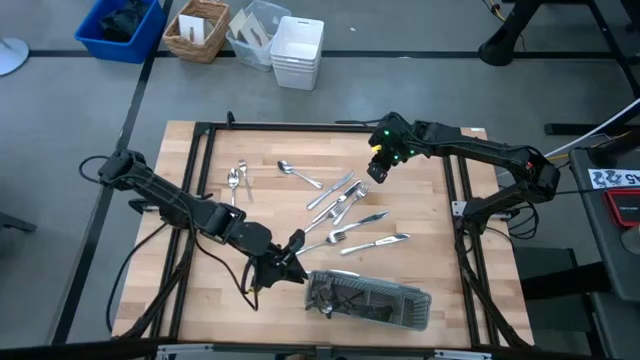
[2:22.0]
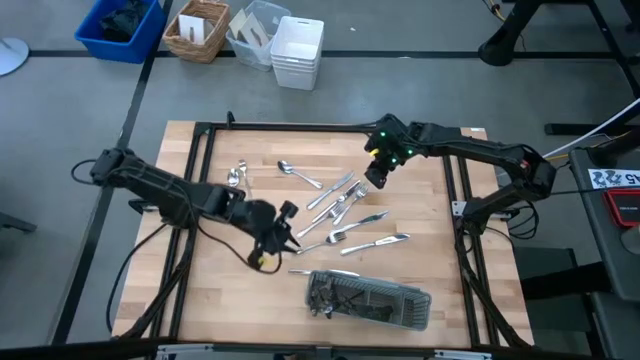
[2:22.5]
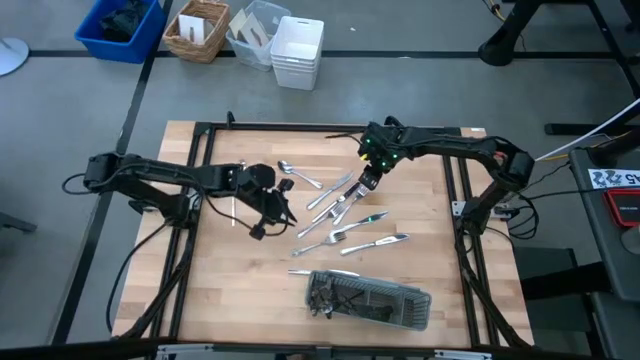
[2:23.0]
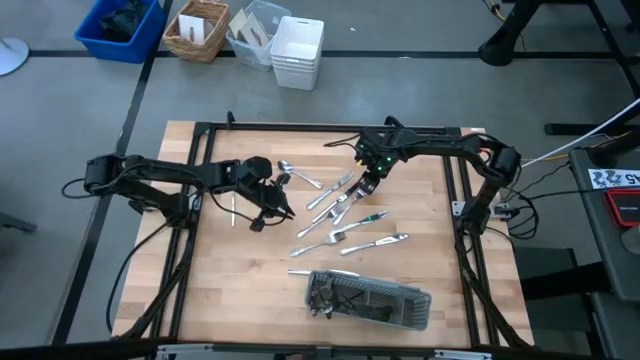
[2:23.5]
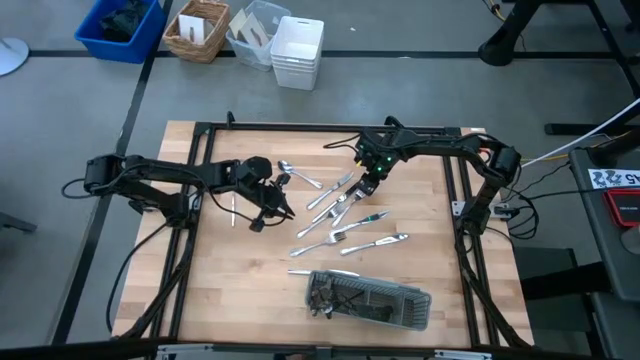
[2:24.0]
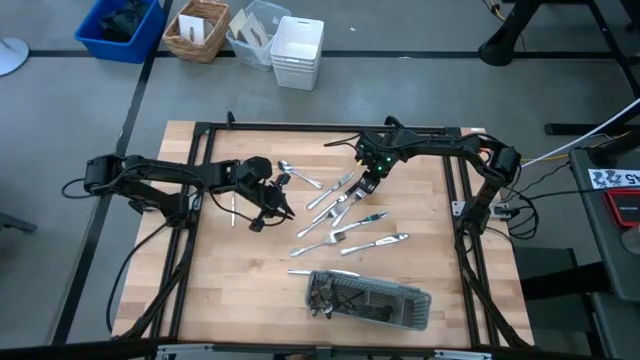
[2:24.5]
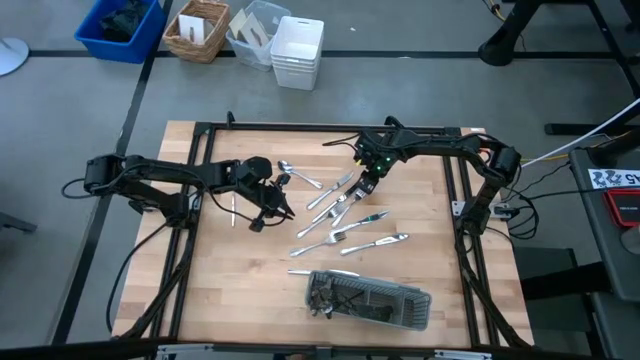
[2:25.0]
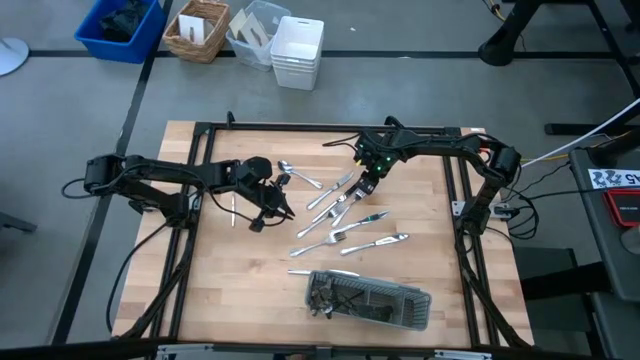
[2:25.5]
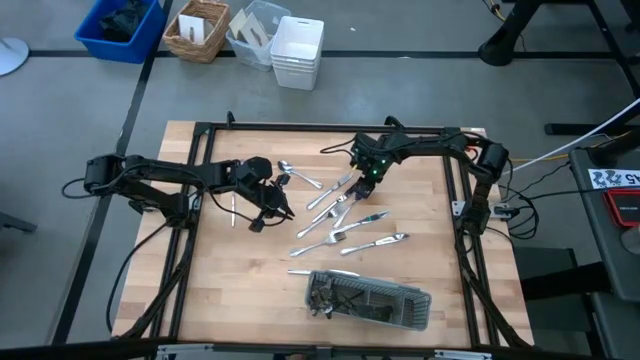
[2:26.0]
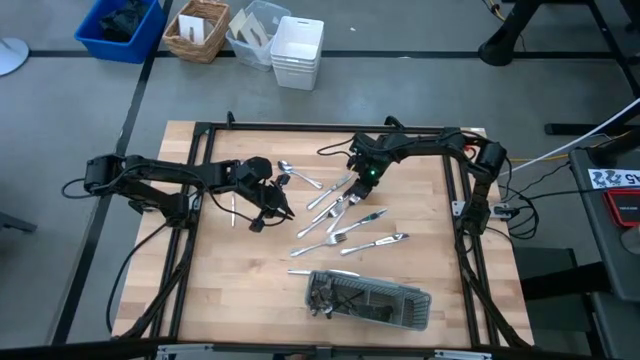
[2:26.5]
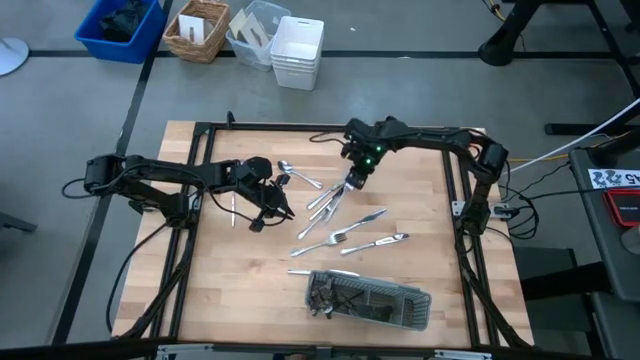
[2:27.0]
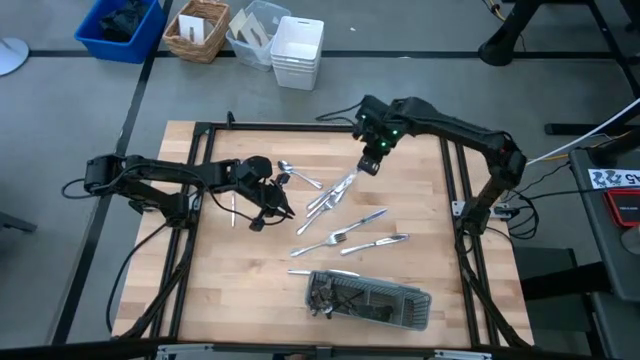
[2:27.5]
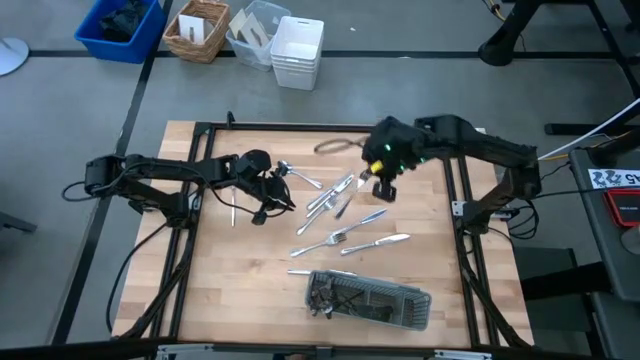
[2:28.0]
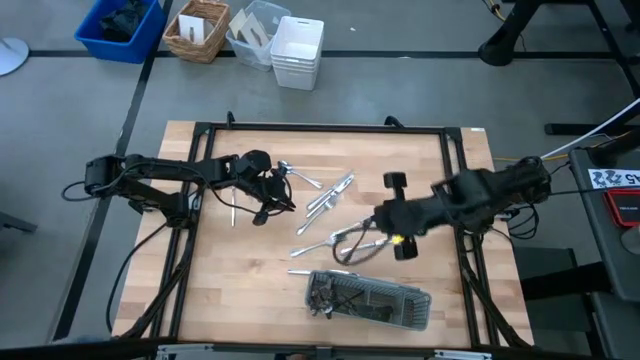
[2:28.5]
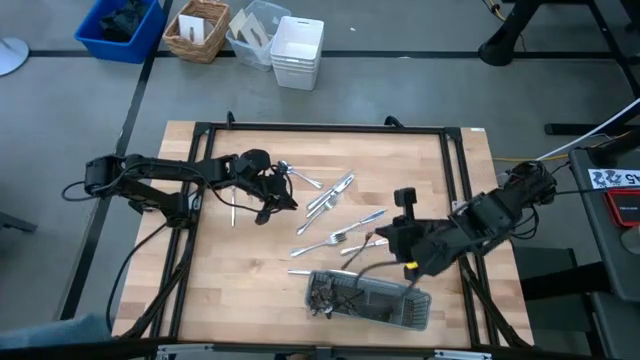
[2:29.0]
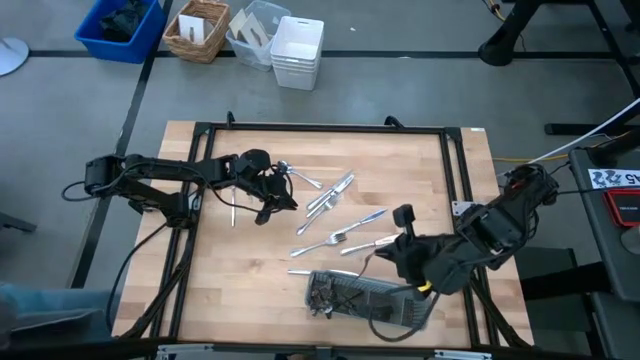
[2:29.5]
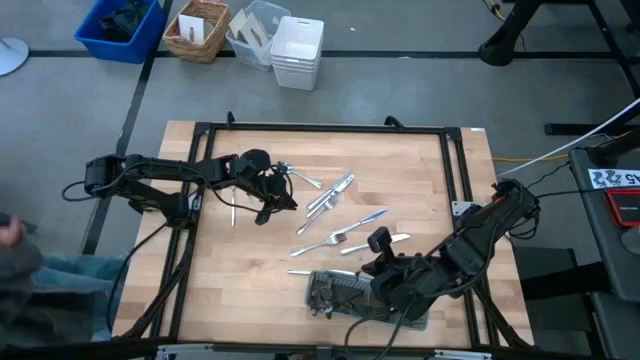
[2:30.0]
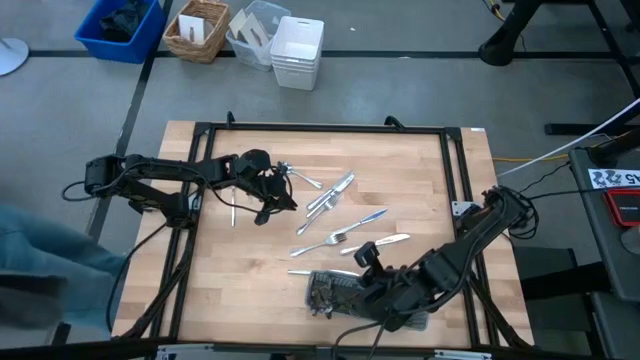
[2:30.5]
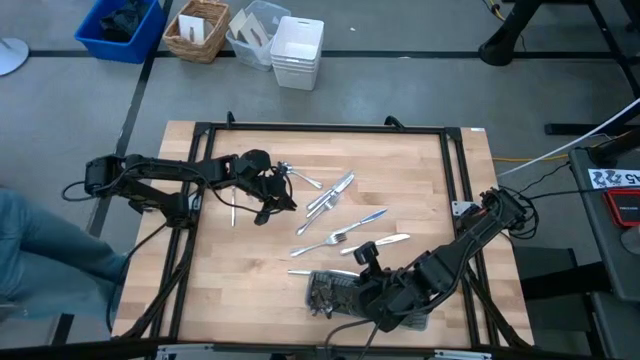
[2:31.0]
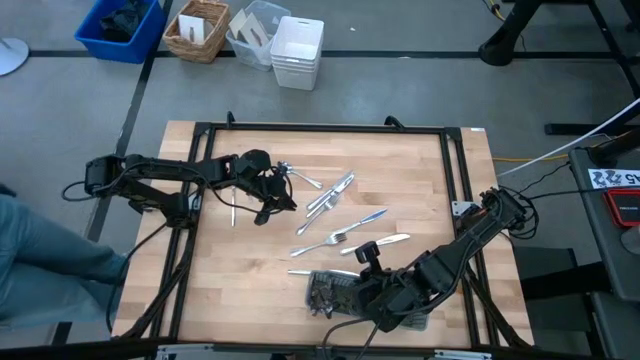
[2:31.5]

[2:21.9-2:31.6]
Task: Sort silverware
Put the fork into the gray silverware rack

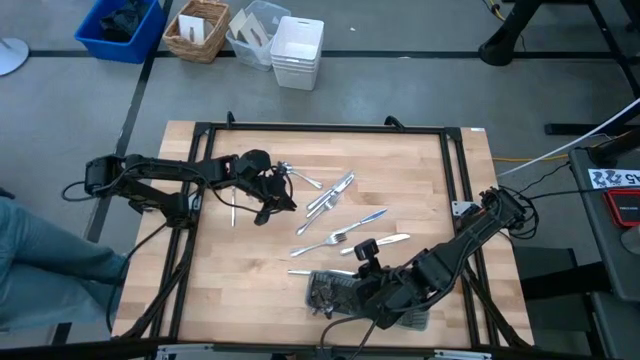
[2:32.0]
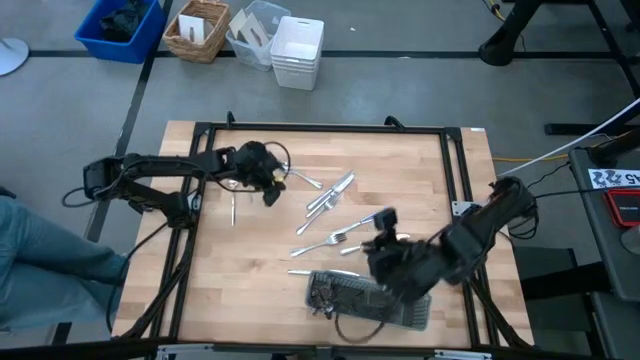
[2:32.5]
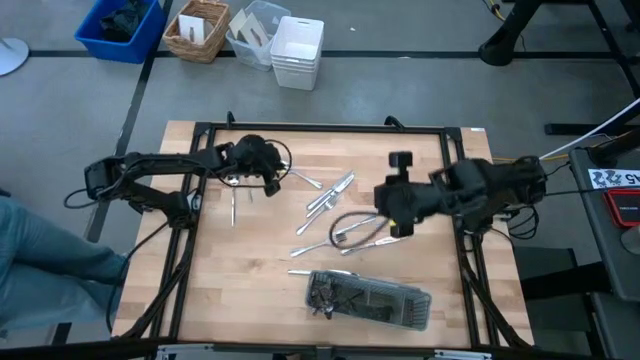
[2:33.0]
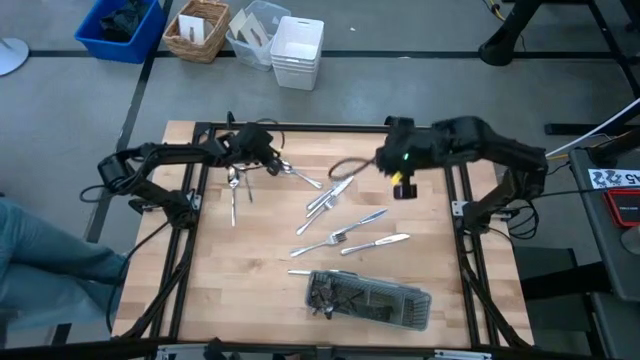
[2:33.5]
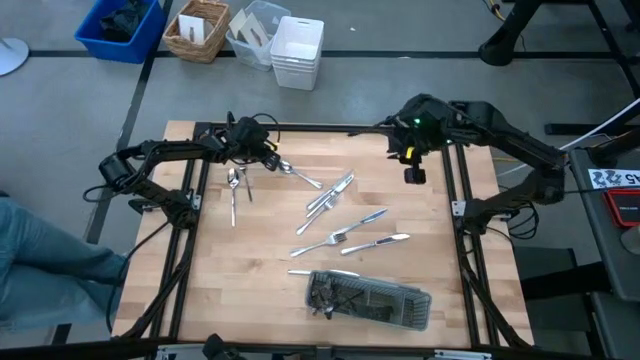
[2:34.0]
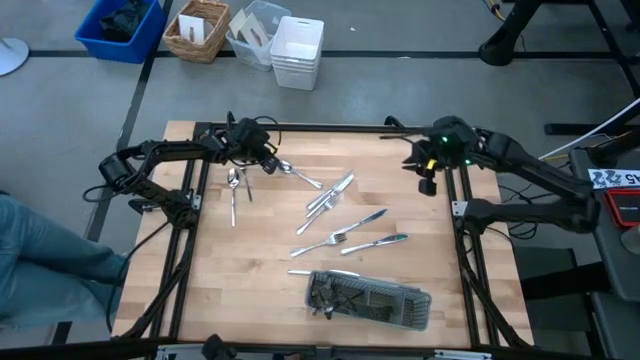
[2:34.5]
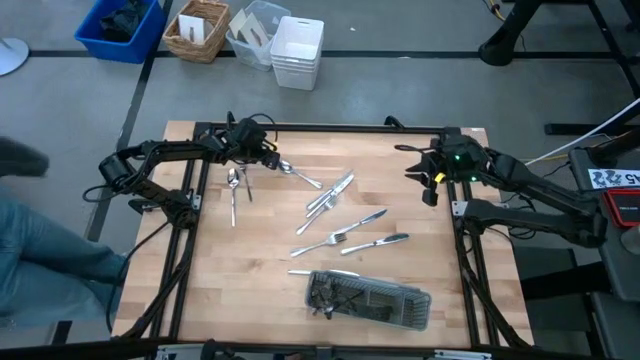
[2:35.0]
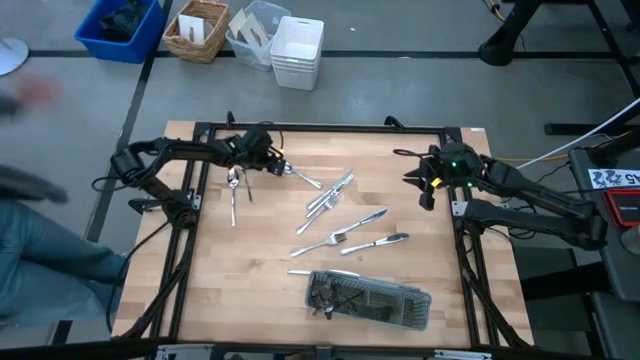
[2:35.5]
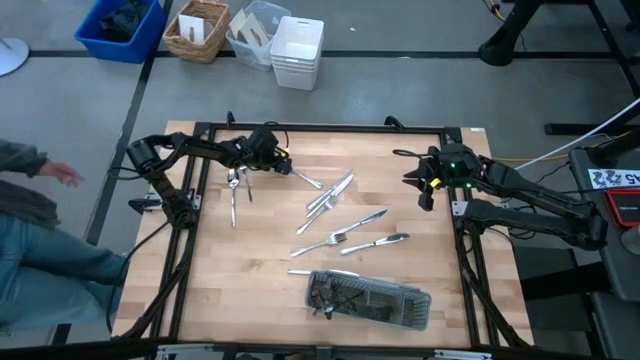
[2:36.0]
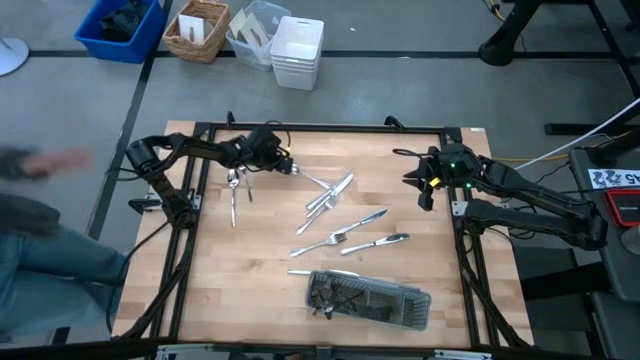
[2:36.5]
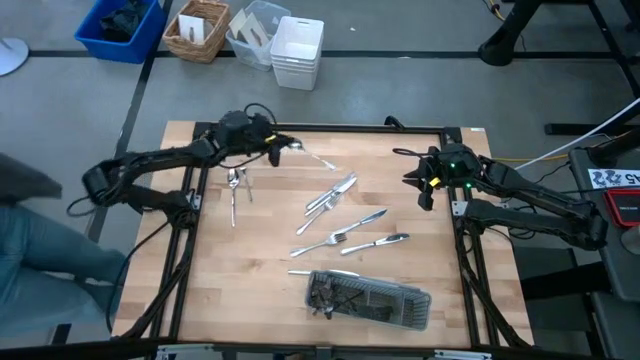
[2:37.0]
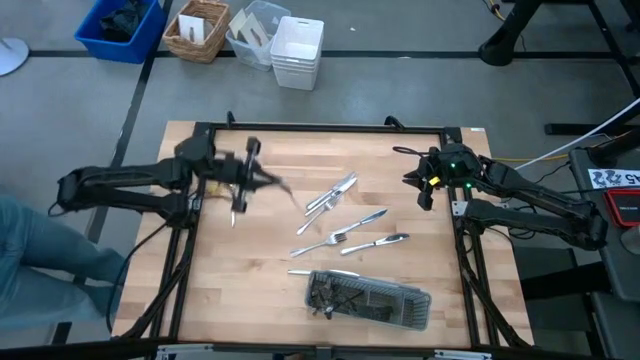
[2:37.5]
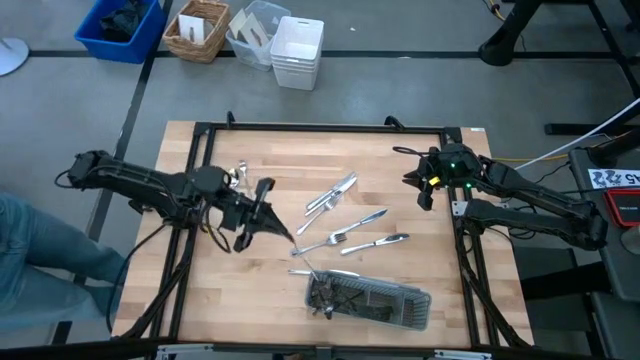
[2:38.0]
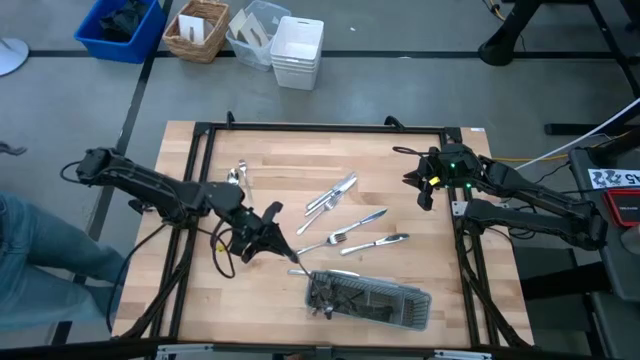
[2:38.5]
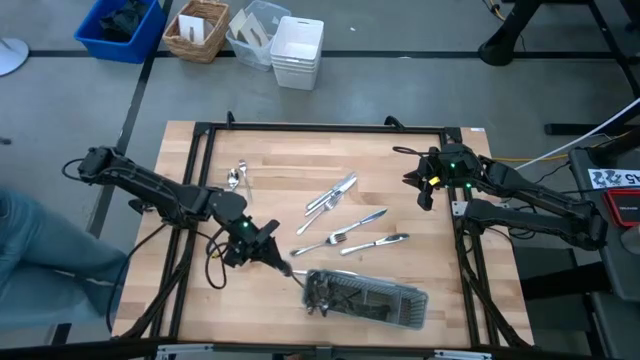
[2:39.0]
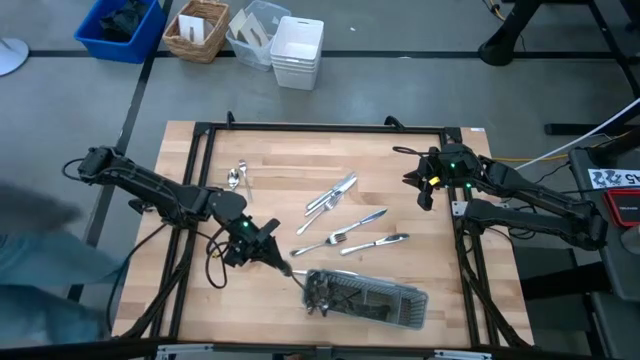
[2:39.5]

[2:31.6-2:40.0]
Put the spoon into the gray silverware rack

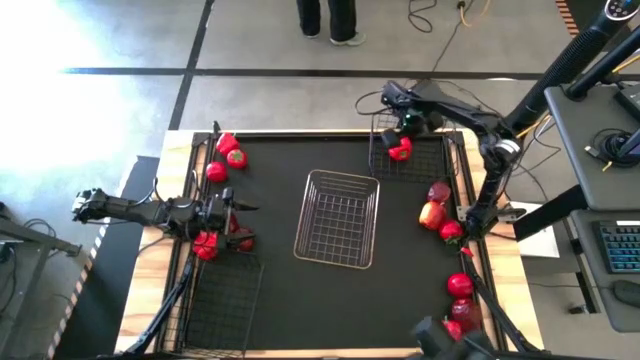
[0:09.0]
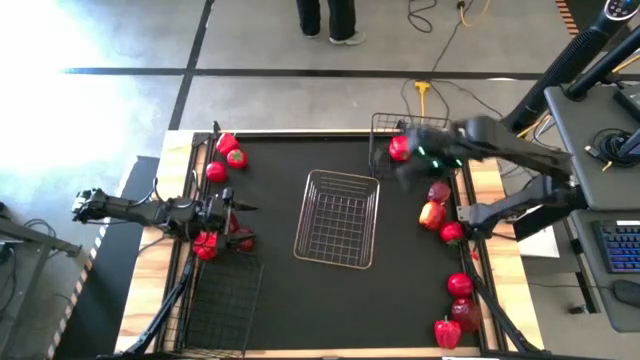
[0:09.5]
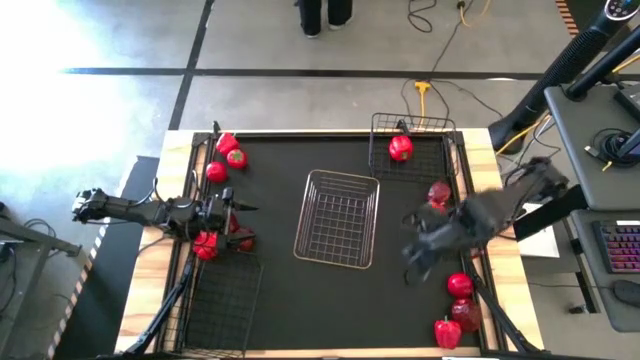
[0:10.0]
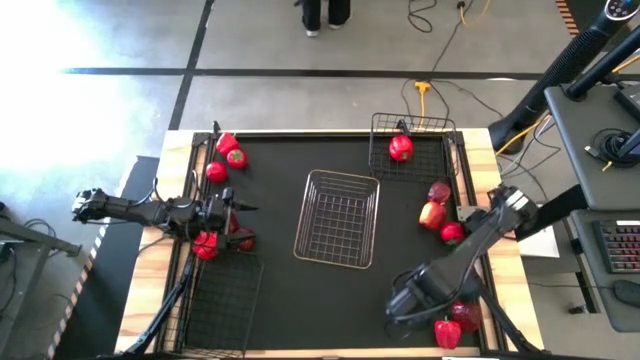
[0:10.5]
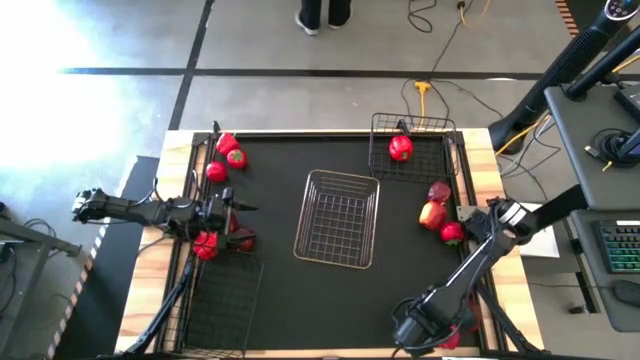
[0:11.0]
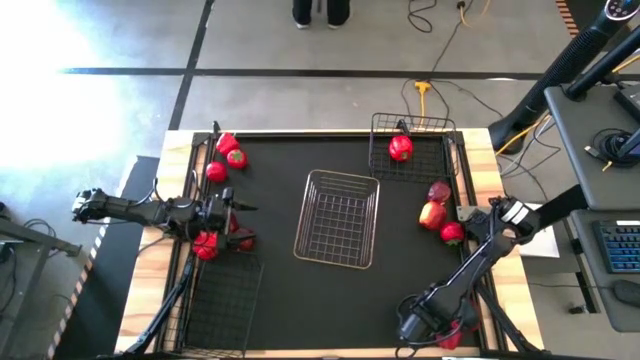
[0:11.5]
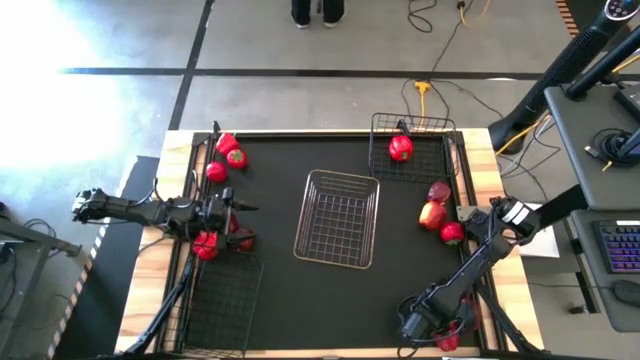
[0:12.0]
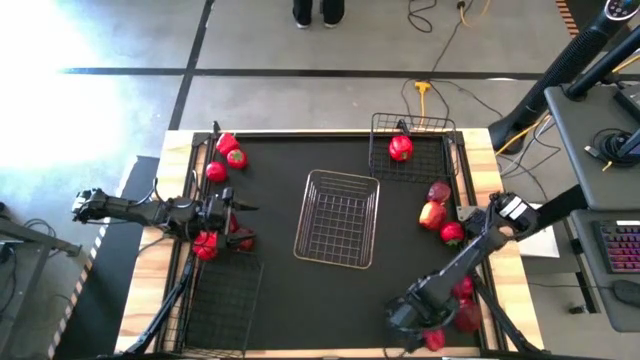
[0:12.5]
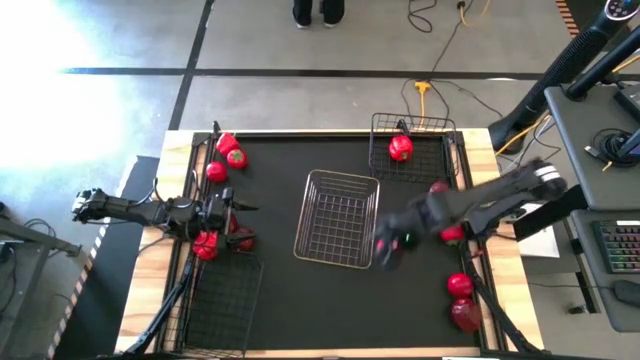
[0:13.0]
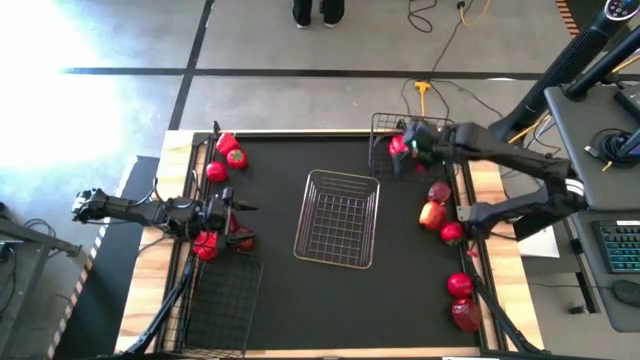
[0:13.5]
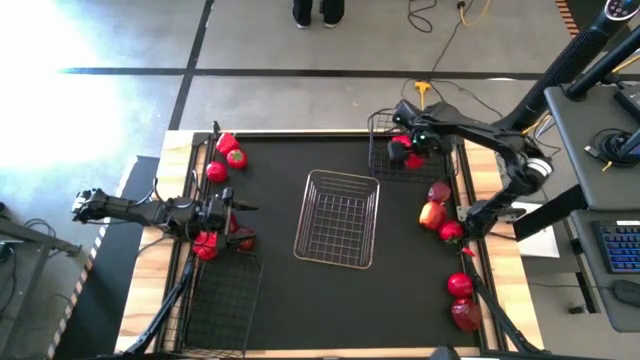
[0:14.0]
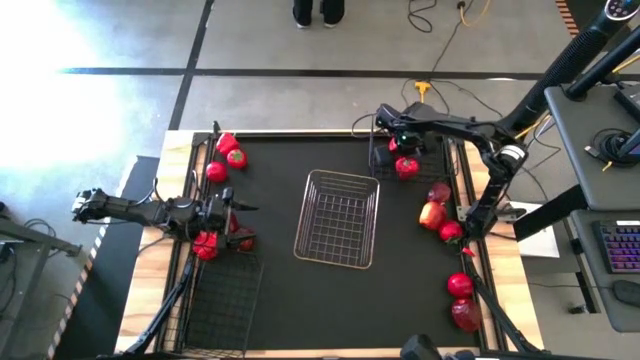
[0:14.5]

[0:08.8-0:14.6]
Task: Sort produce into baskets
Put the red bell pepper into the top black wire basket
